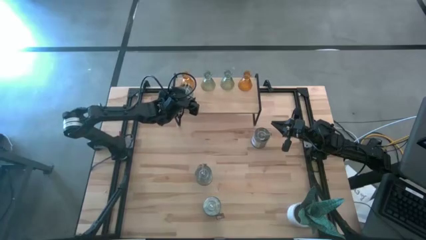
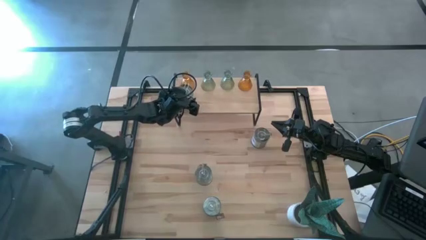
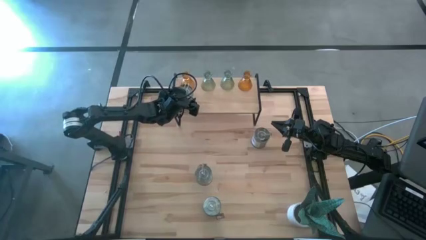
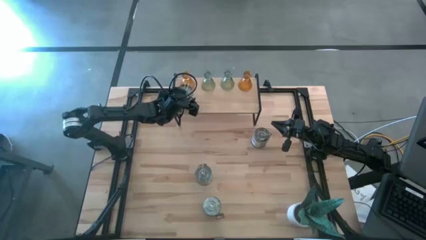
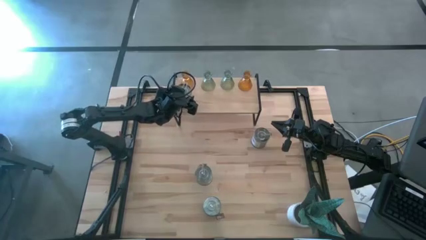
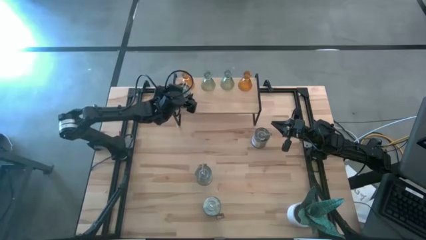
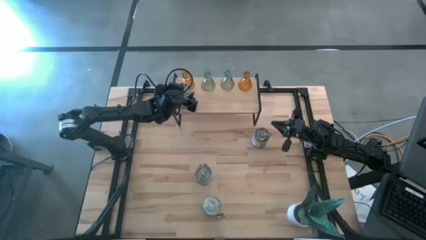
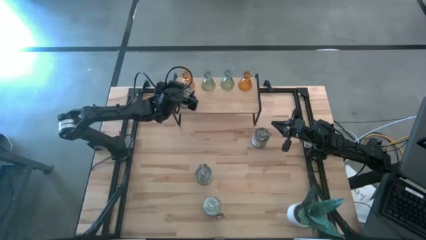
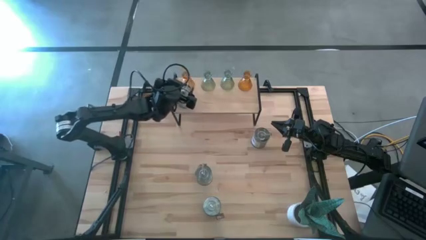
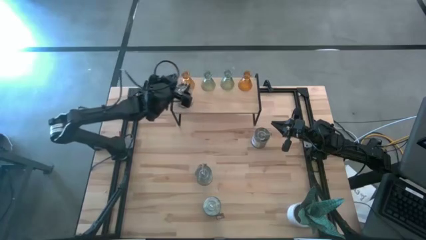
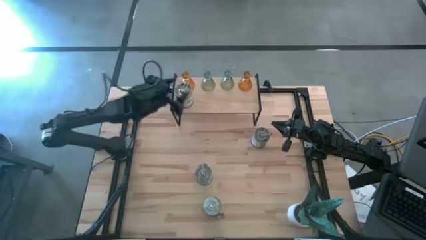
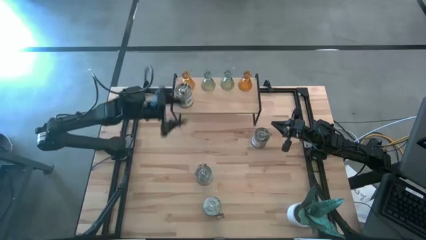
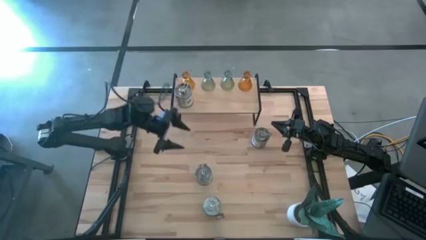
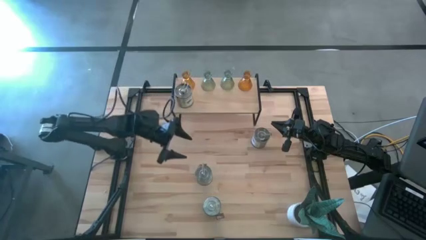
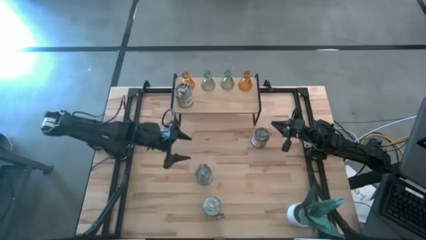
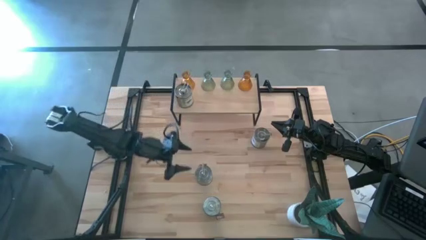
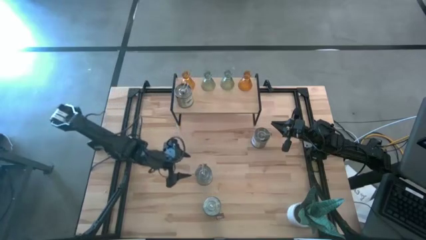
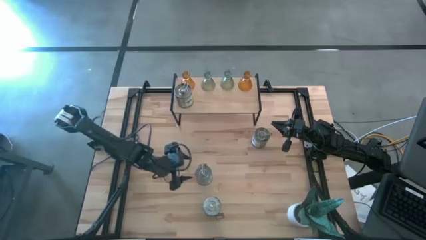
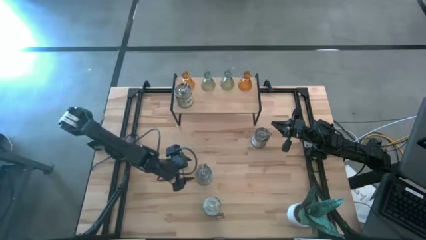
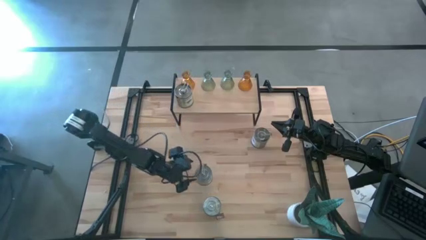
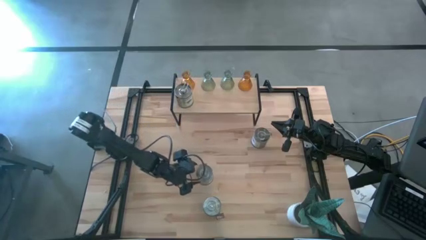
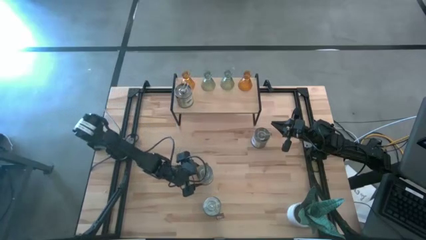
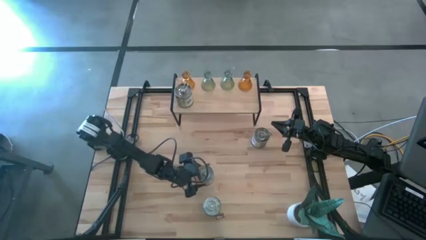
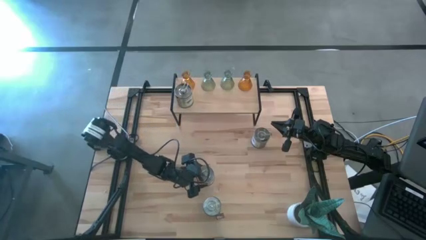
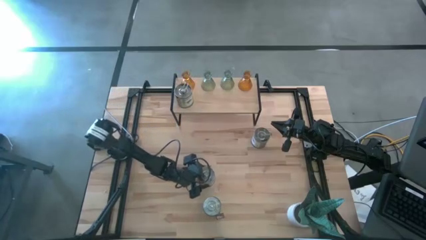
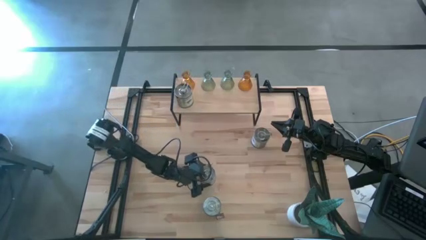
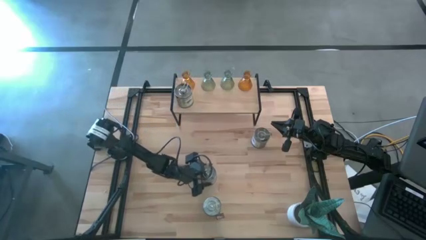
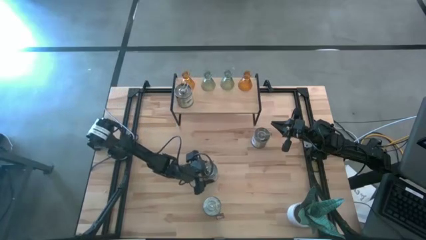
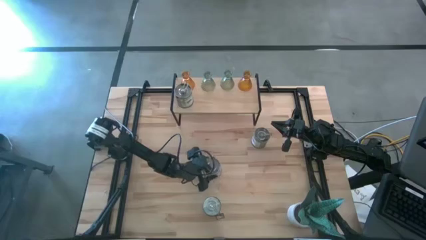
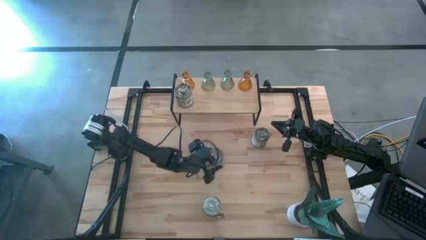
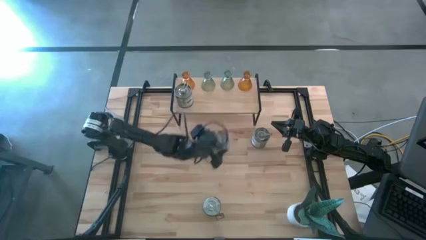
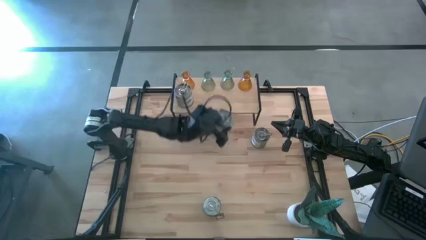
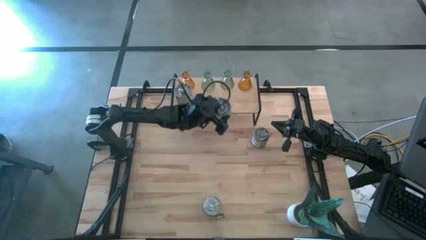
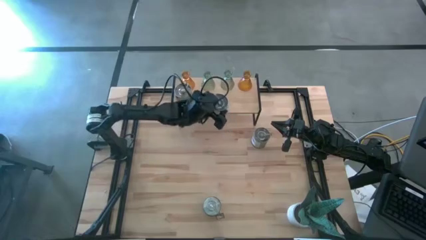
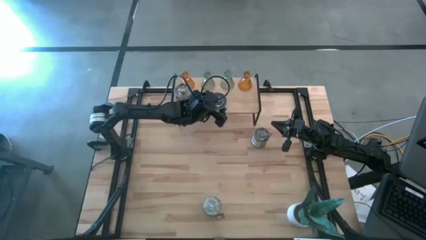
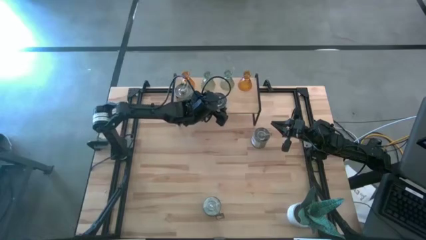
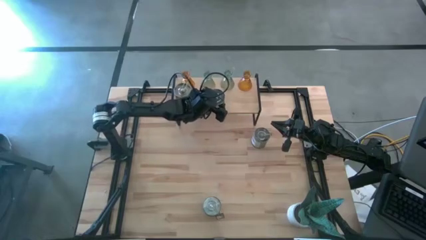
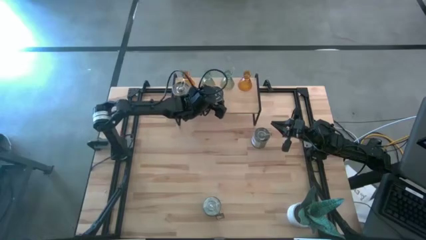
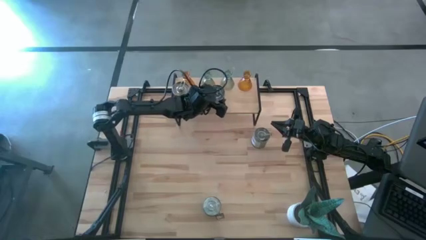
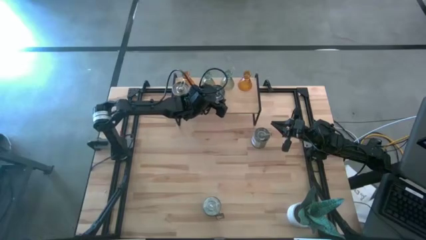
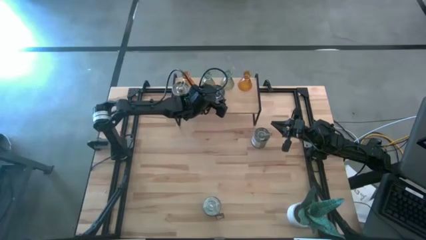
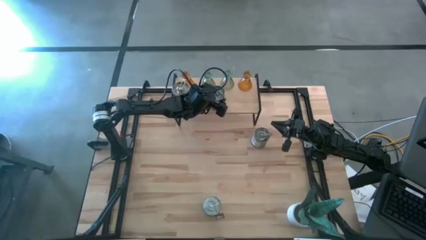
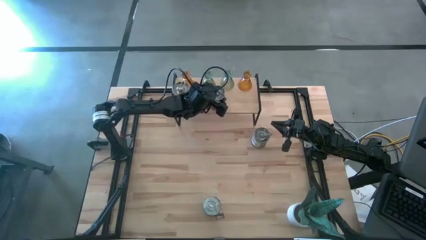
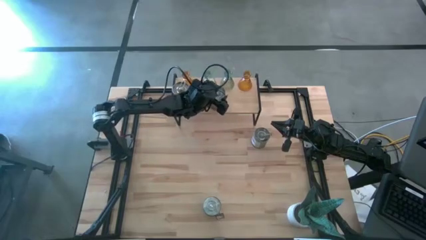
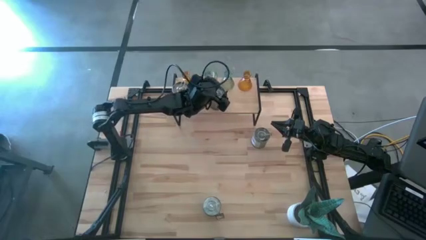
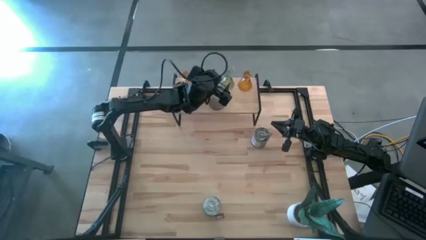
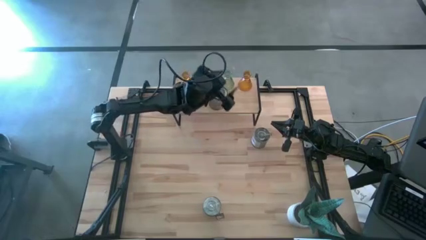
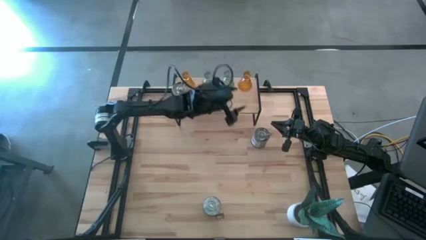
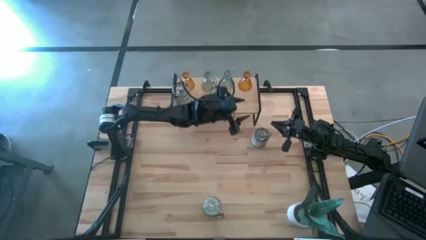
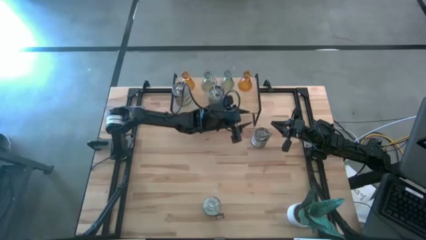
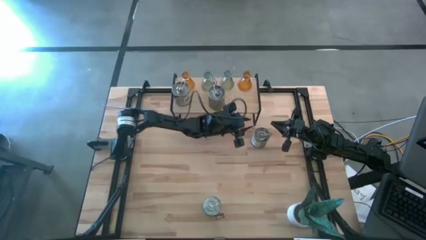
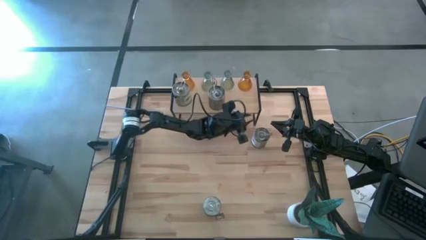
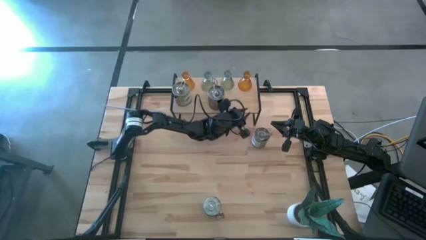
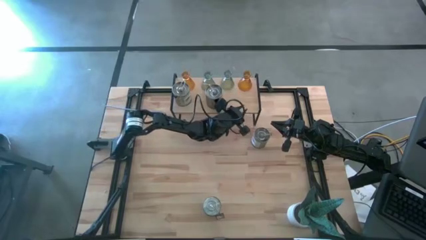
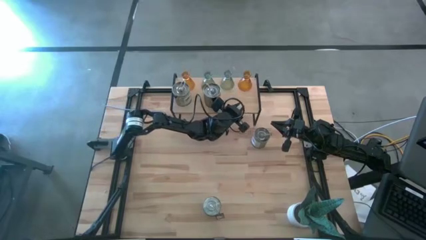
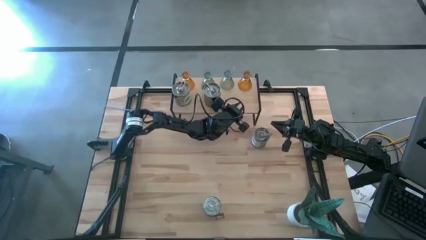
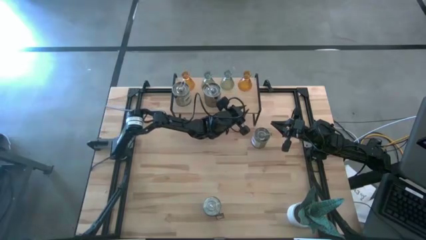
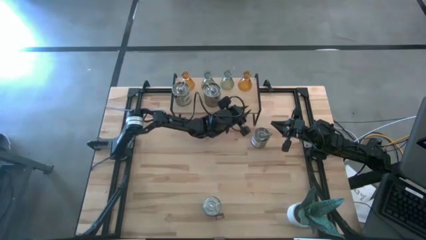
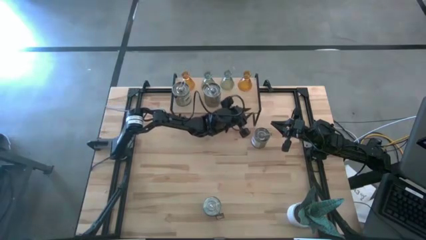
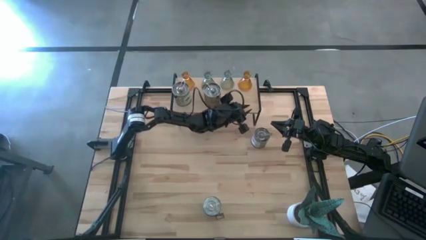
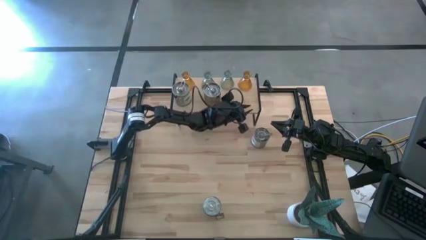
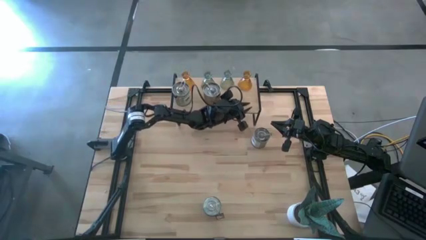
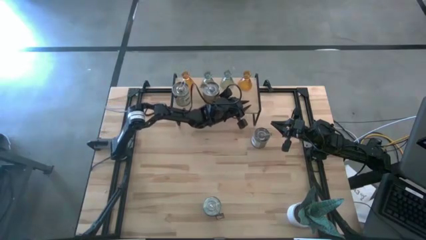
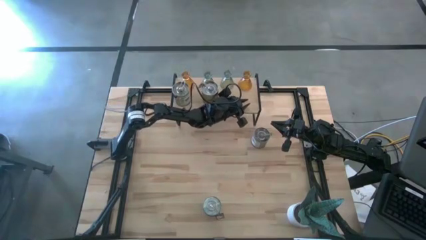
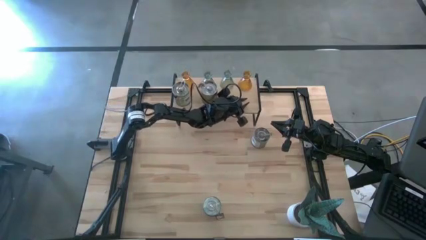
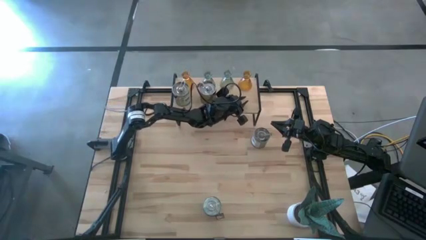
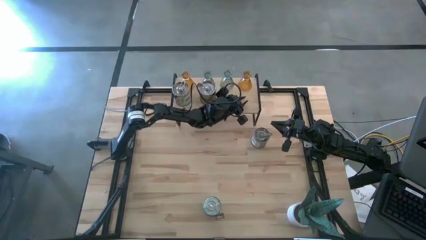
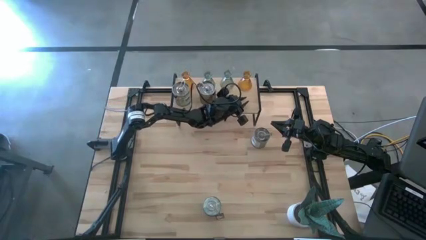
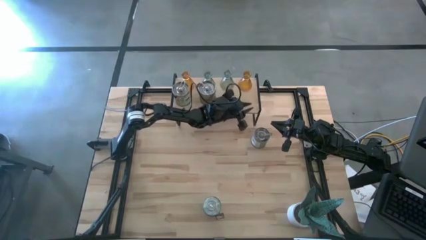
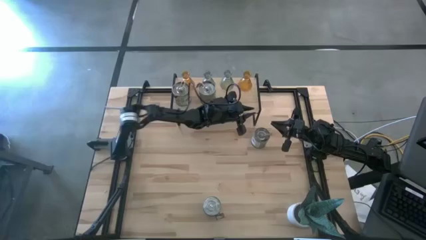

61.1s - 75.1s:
Task: Pick & Place candle stick holders
Put the jar candle on the shelf aligned with the other jar candle

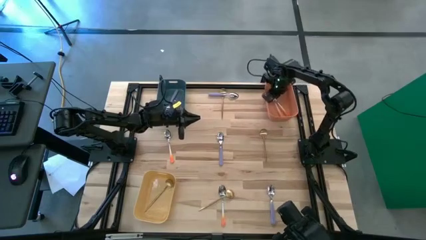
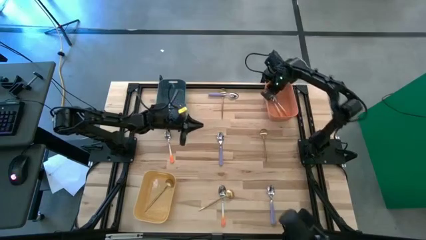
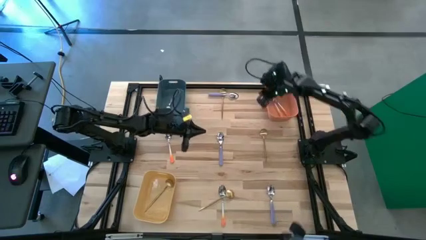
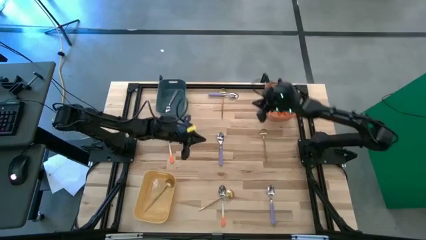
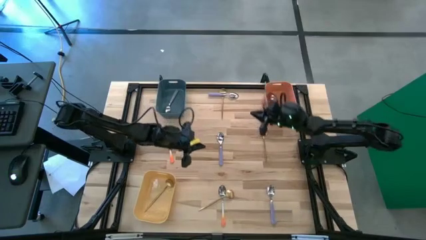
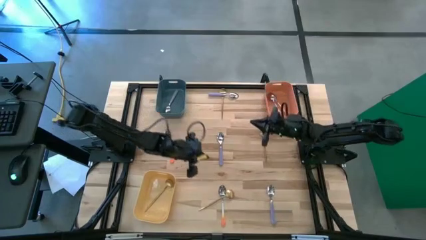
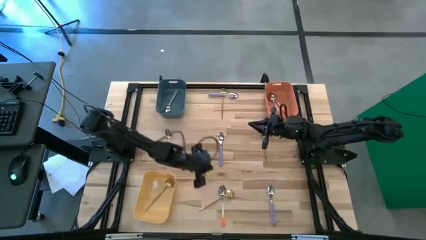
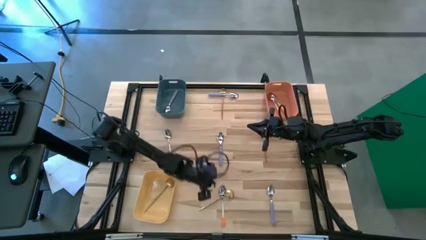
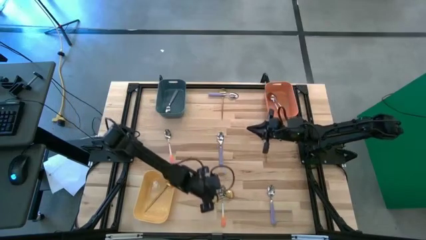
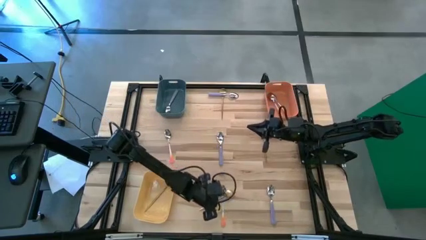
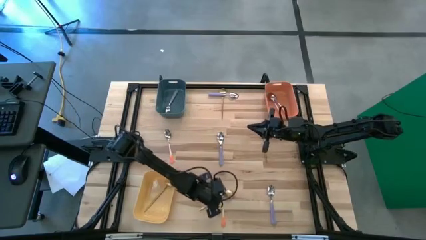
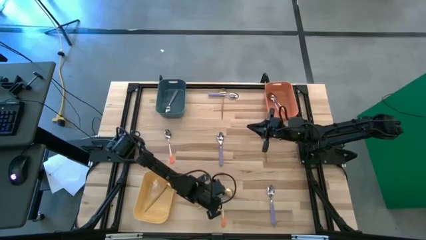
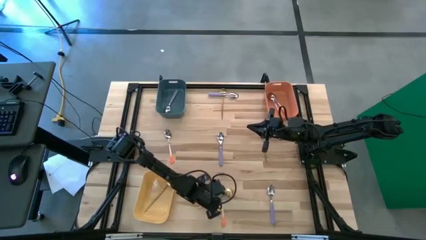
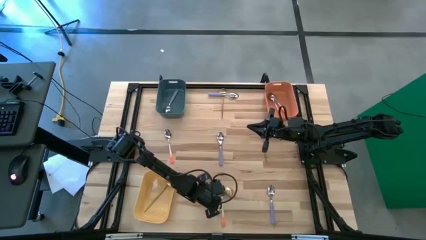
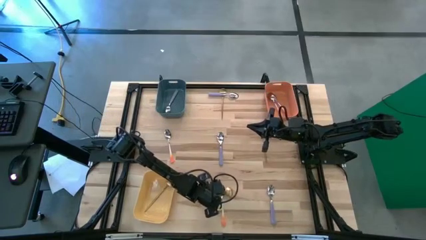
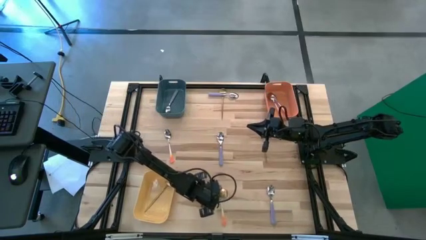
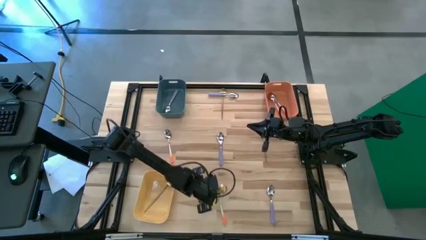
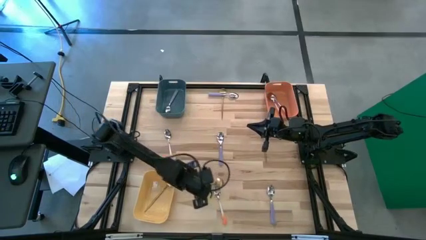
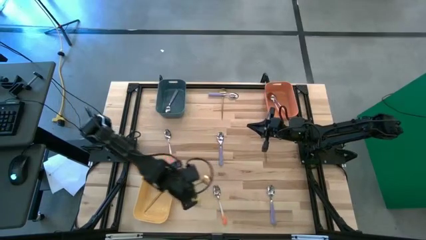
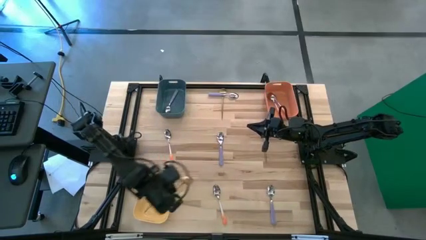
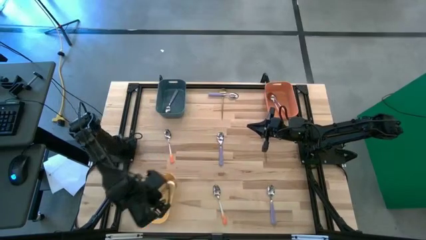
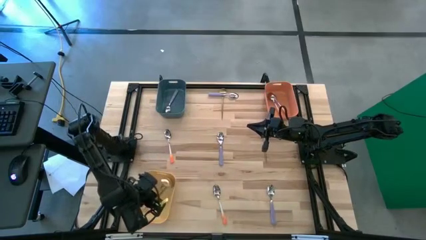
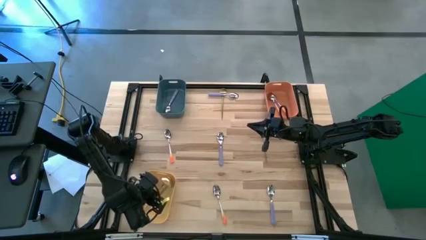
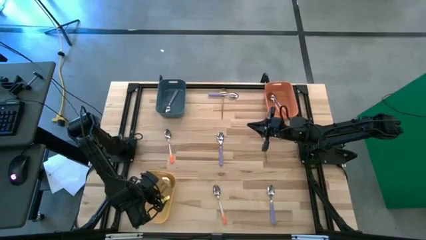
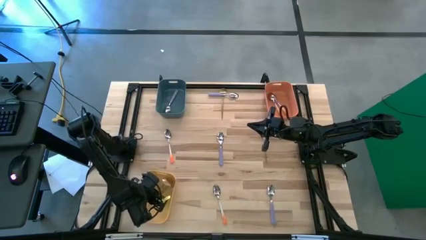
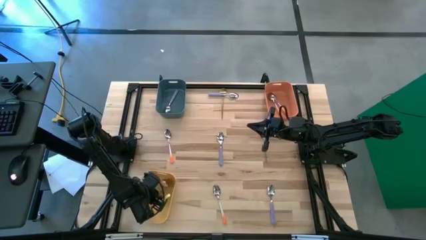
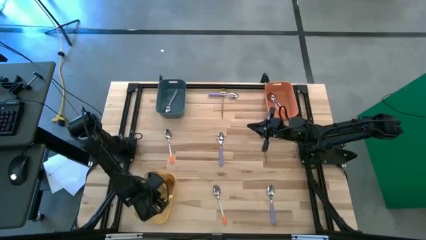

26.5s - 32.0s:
Task: Sort silverware by color (type)
Put the bottom left gold spoon into the yellow bin
